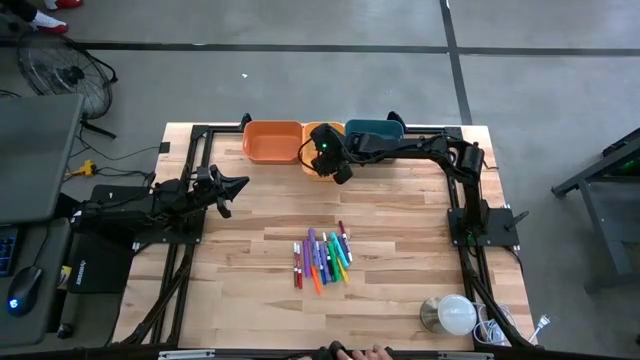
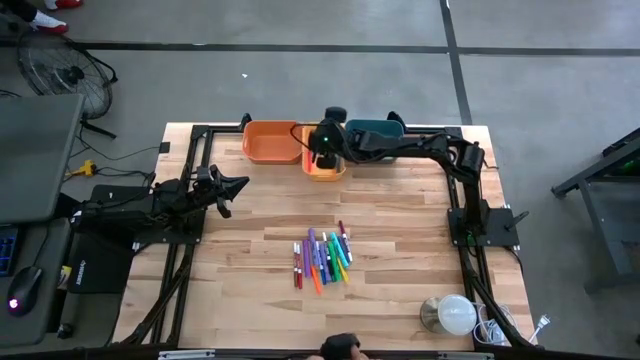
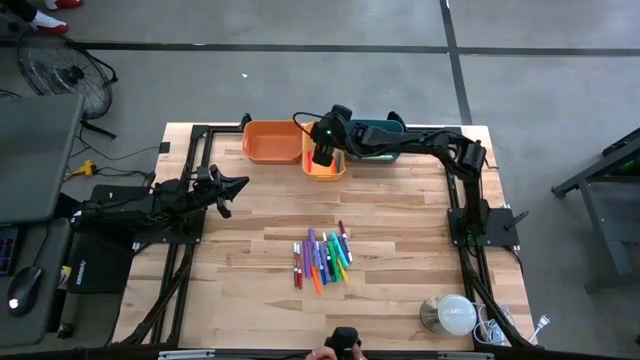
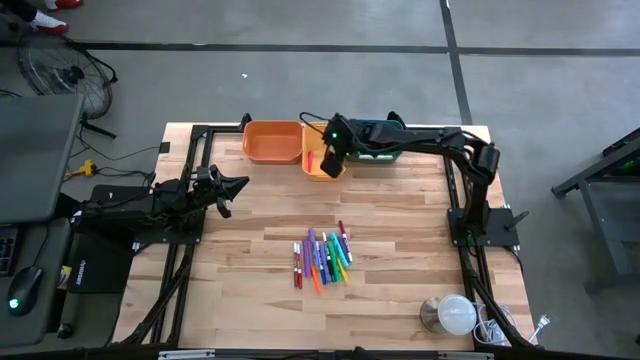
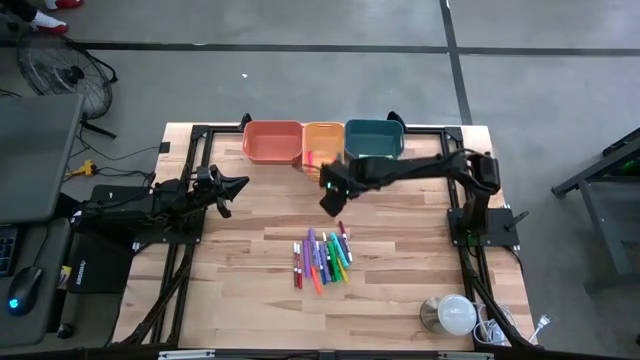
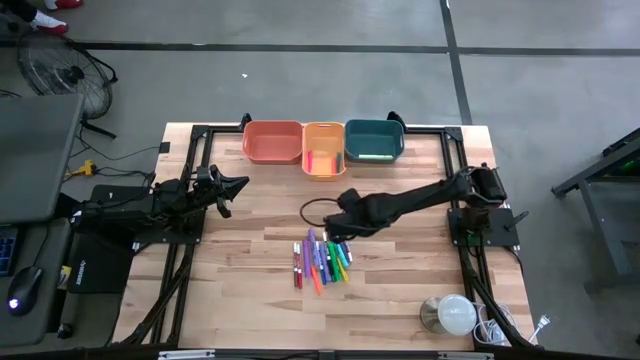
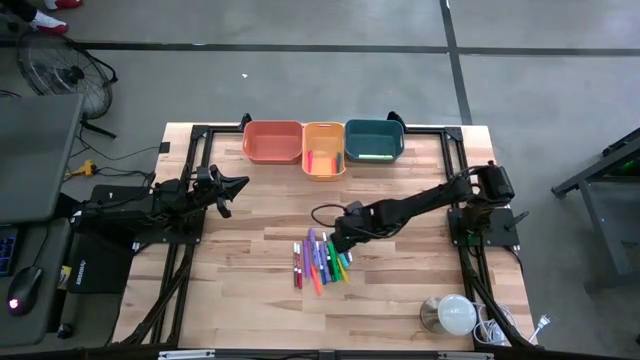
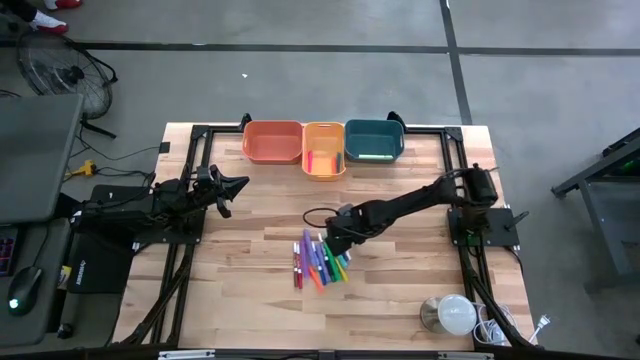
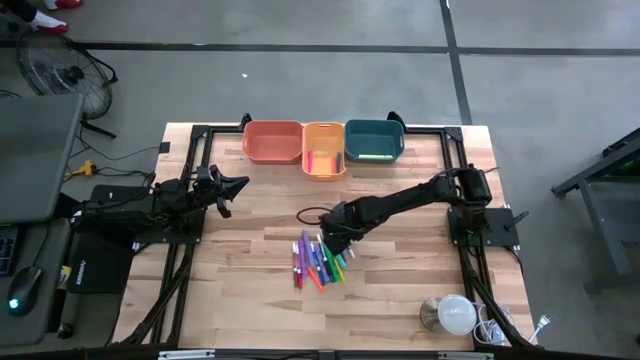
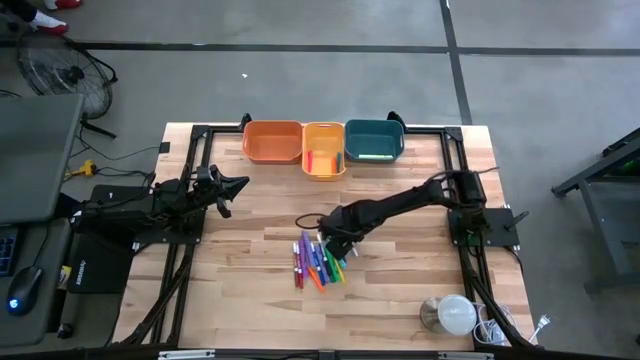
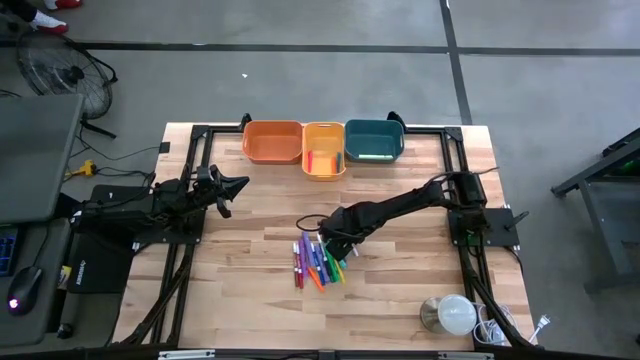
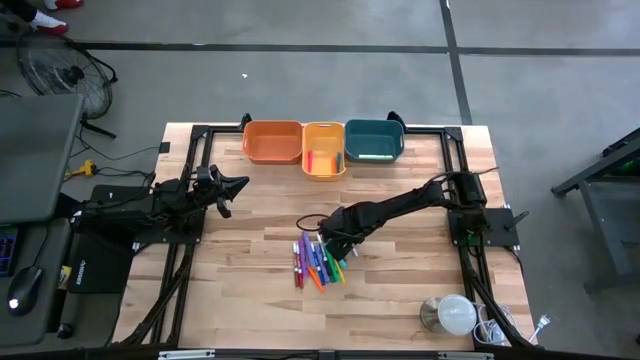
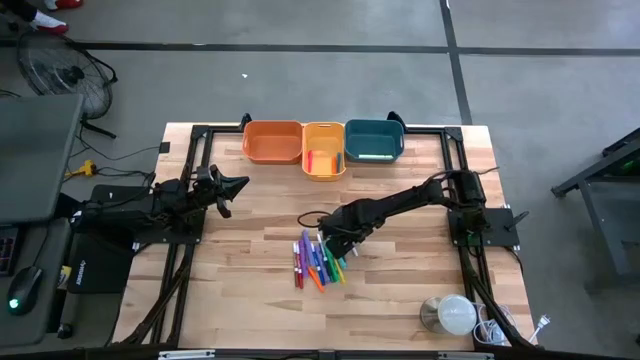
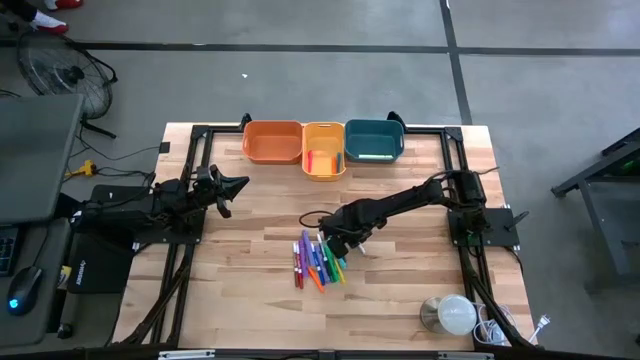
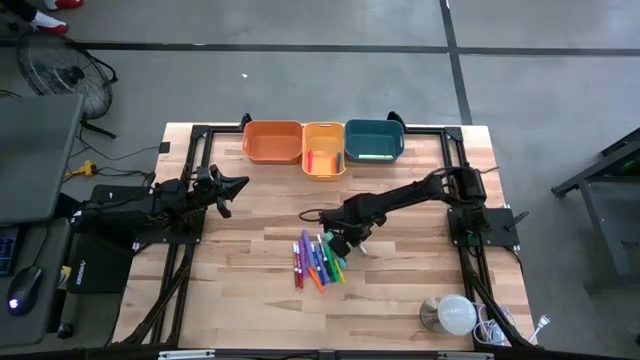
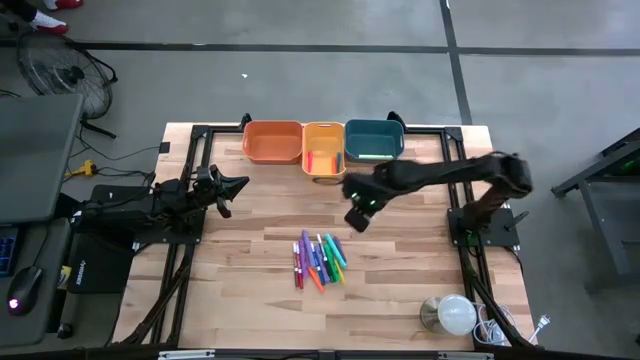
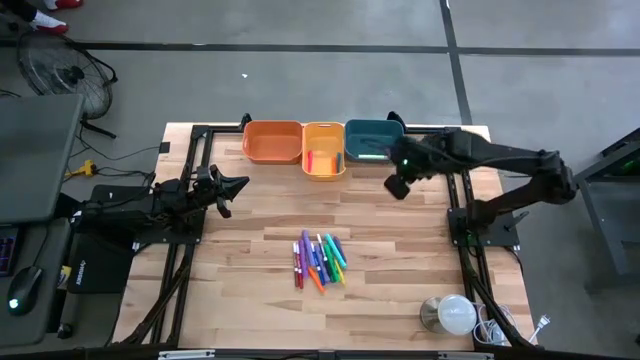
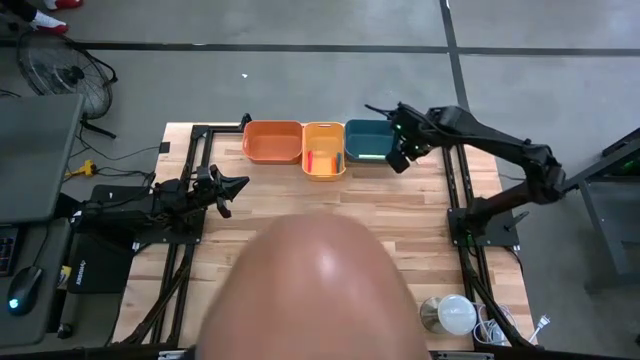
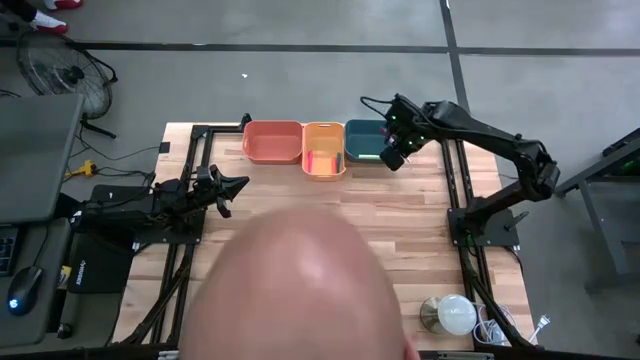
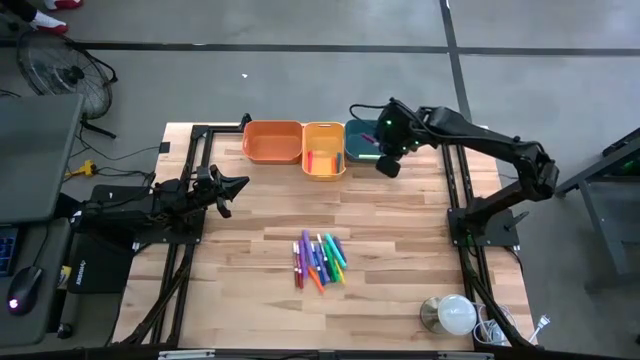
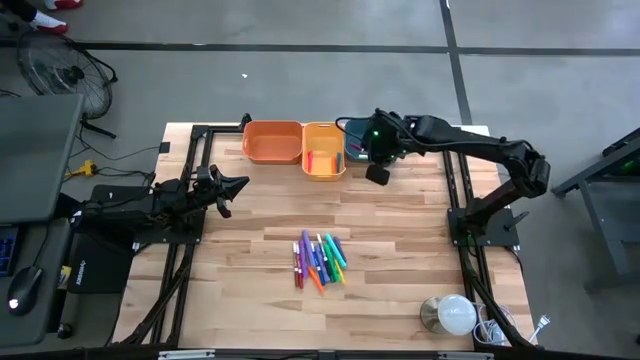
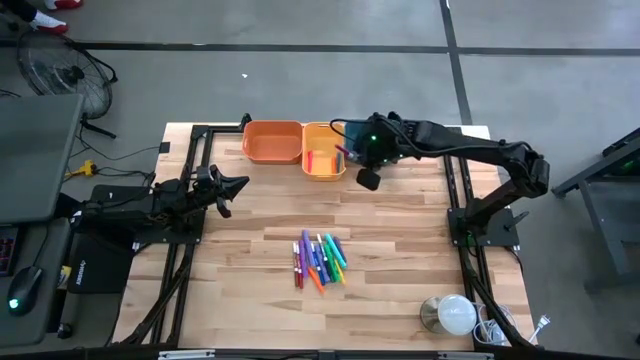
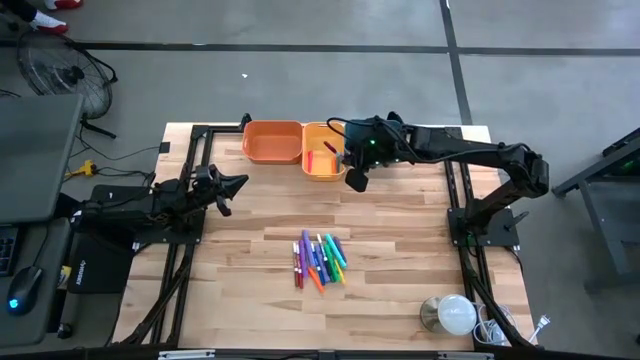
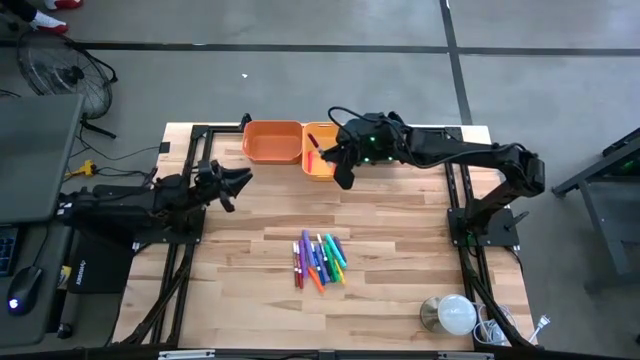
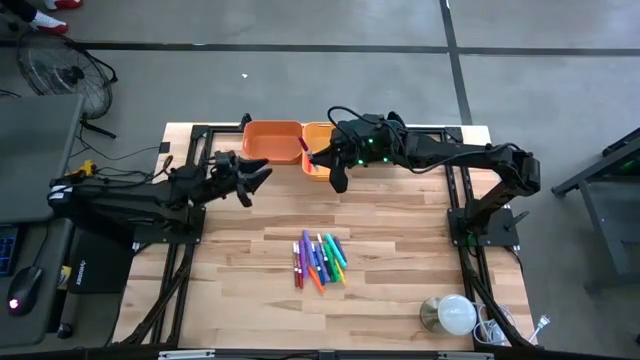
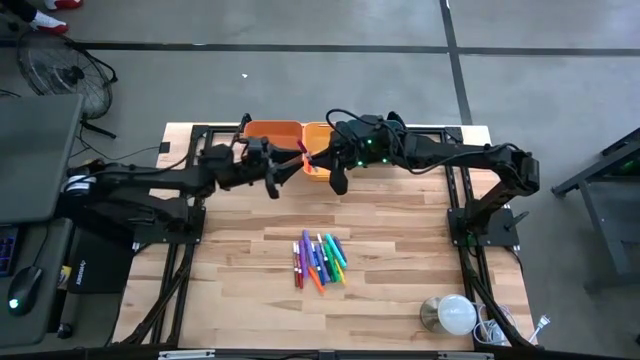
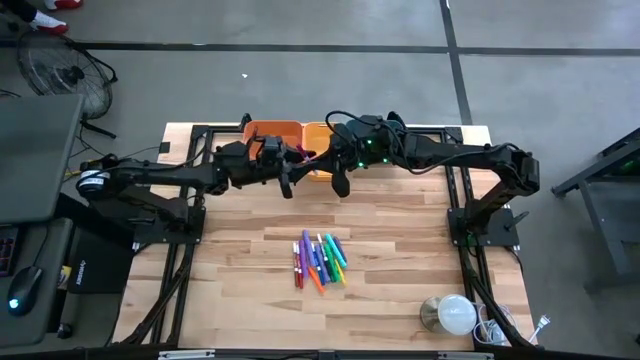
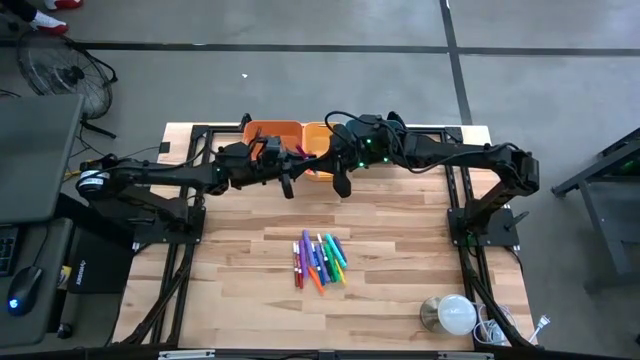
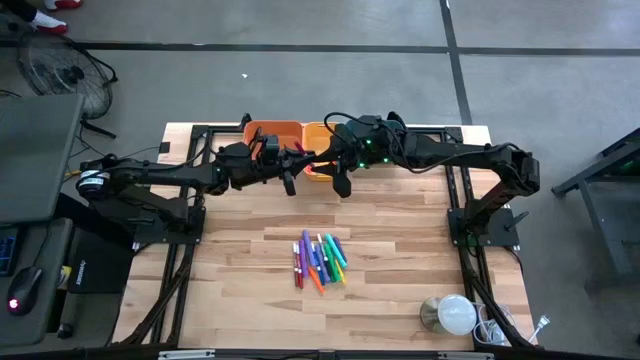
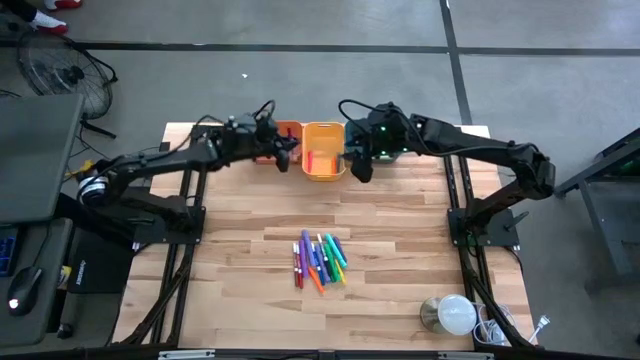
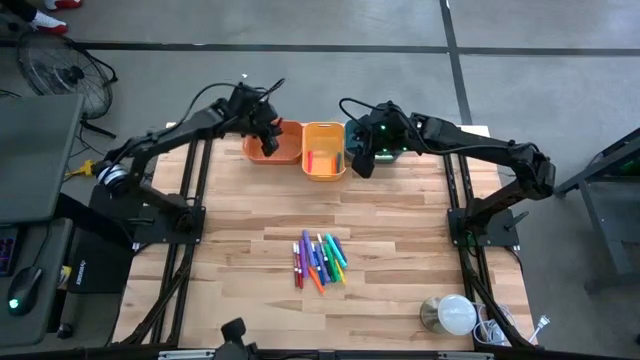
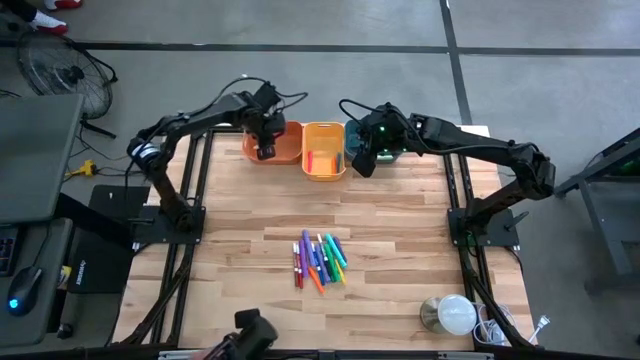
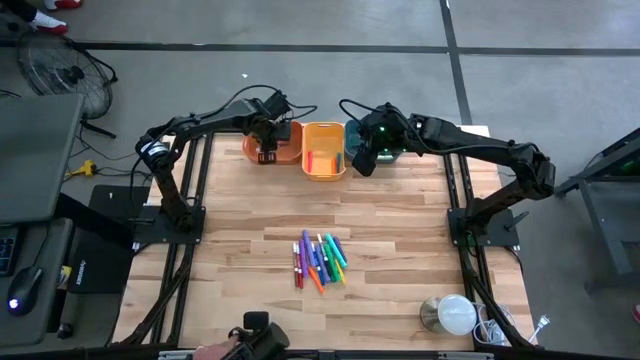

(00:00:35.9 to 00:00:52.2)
Task: Pick & Place Markers
Put the purple marker into the orange bin
